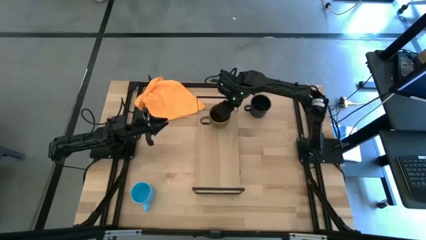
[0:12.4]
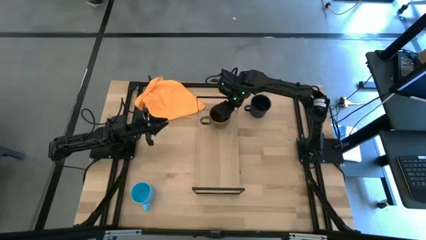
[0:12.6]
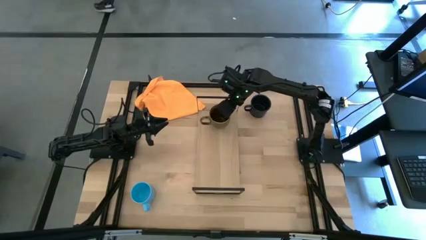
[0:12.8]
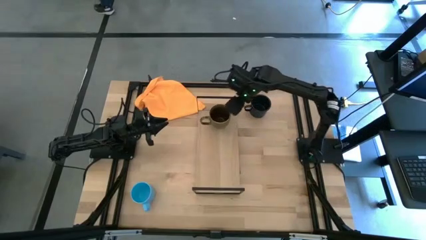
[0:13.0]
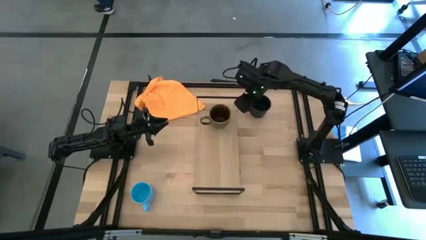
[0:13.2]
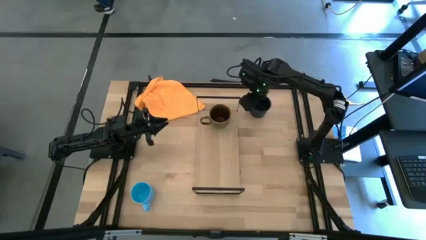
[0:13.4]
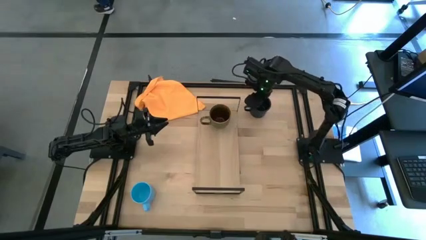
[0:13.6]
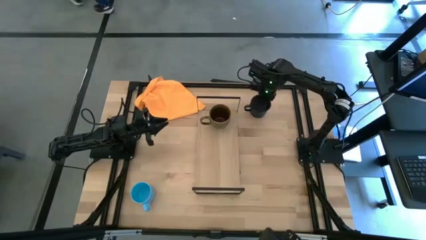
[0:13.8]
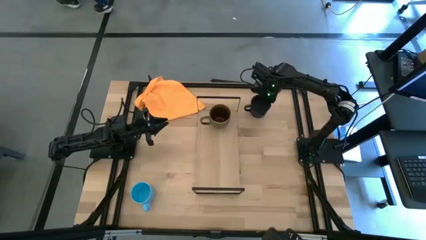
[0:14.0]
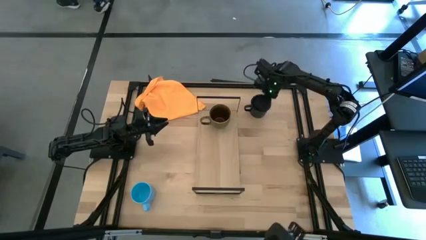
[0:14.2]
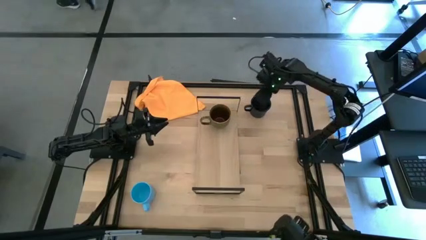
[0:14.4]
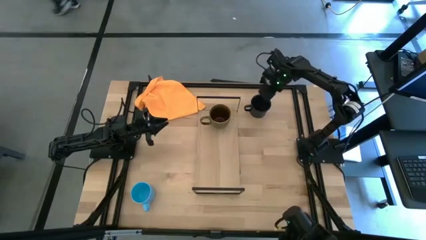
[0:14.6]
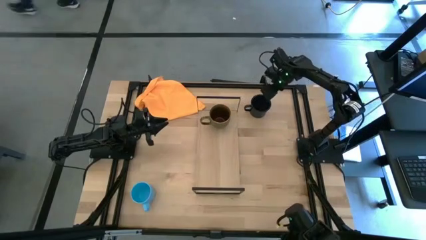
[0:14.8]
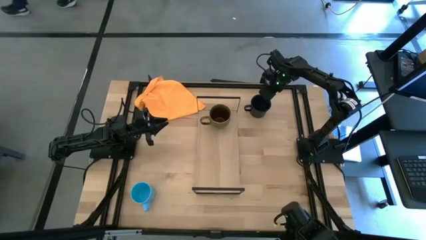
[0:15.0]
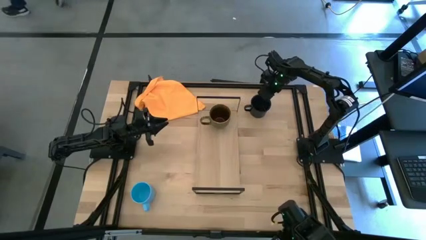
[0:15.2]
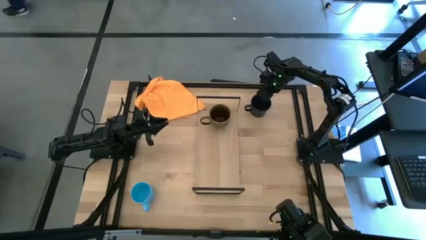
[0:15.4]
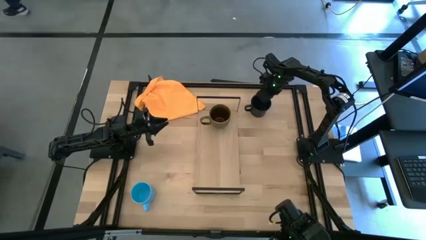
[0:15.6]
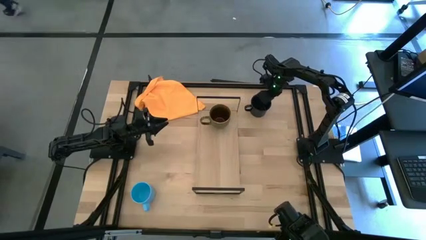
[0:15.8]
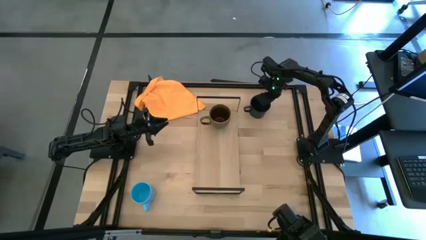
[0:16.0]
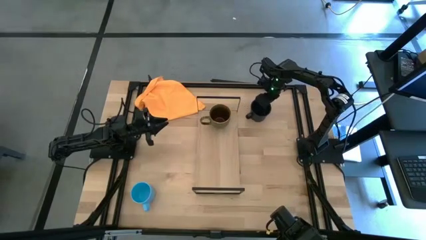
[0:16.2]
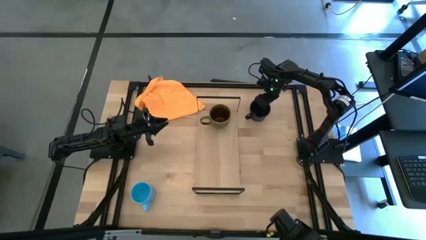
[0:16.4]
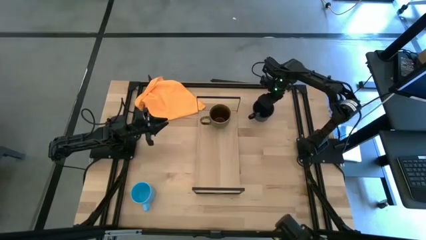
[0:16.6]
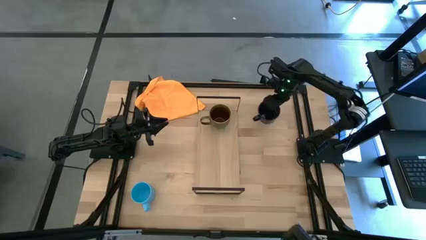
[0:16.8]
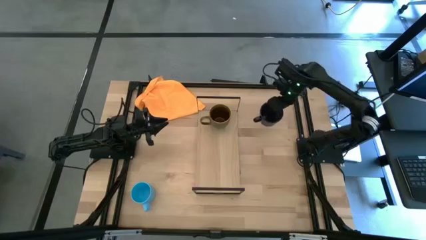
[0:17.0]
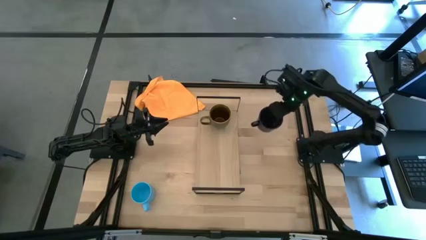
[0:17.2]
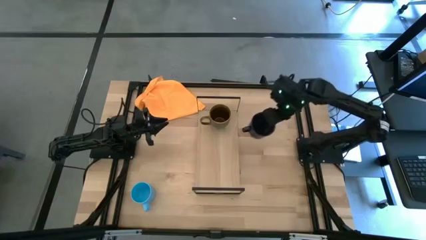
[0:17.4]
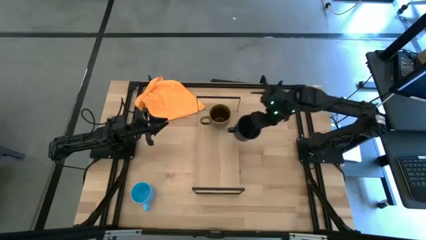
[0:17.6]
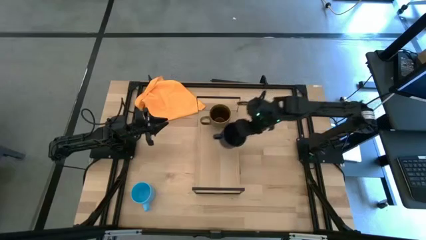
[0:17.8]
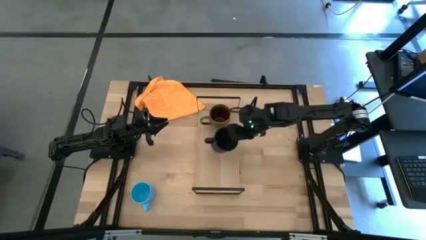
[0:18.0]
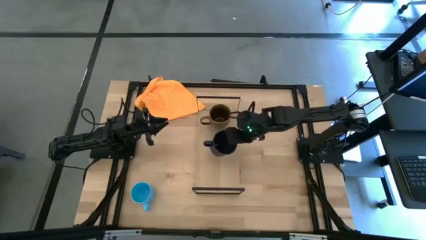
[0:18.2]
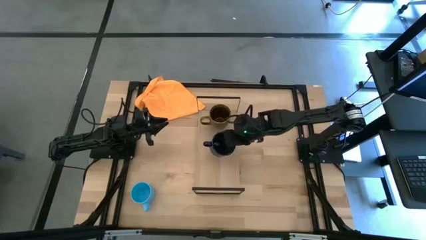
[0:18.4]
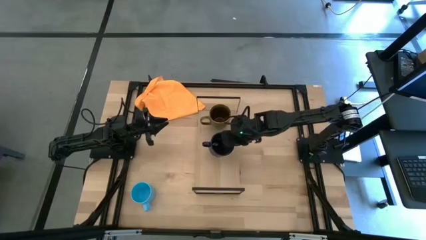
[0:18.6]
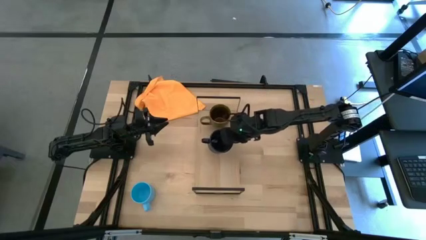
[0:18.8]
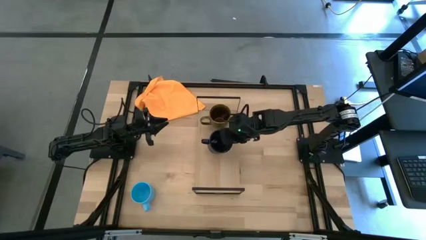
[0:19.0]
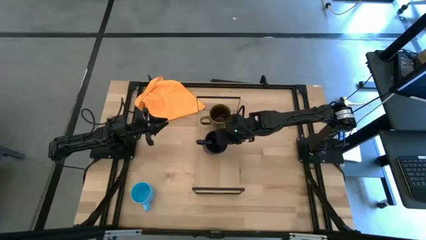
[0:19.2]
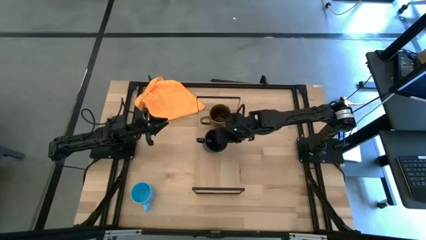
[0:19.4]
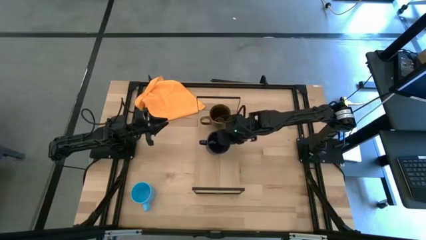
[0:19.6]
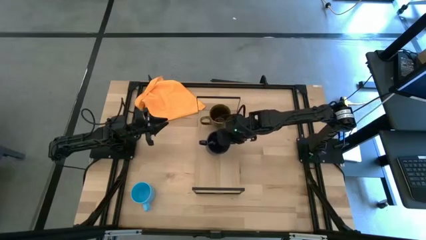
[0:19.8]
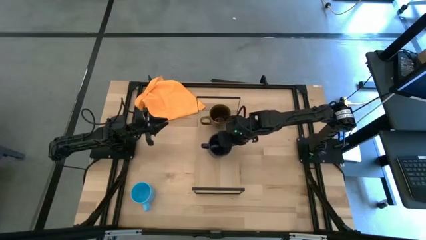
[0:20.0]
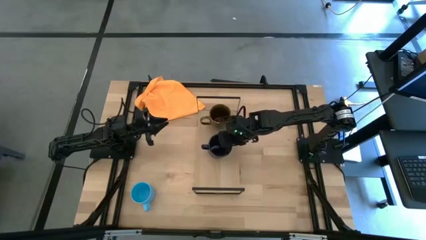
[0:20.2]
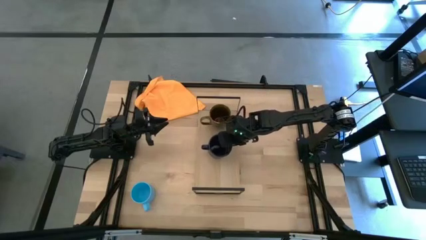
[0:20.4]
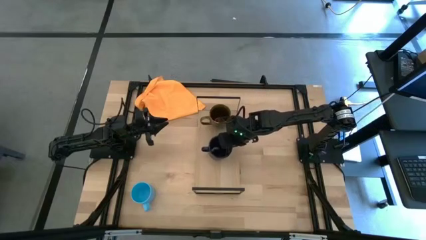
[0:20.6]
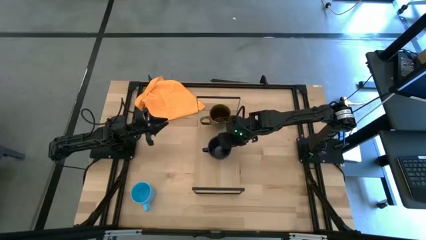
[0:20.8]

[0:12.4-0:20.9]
Task: Stack small to large cups/mugs on shelf
Put the blue mug on the shelf

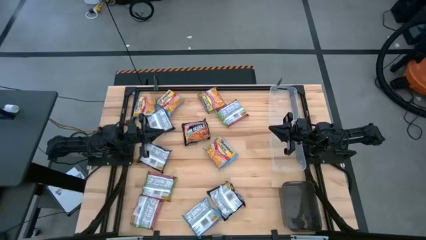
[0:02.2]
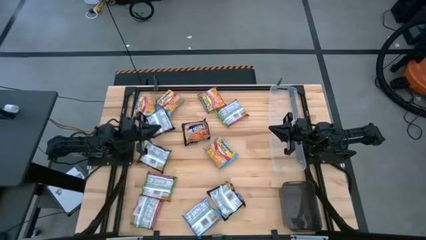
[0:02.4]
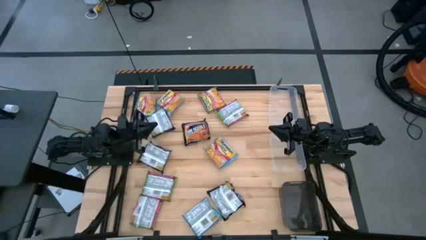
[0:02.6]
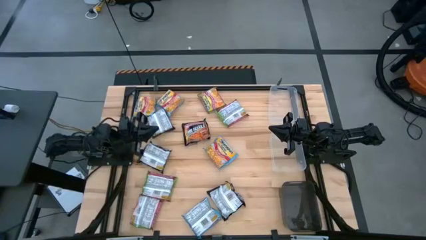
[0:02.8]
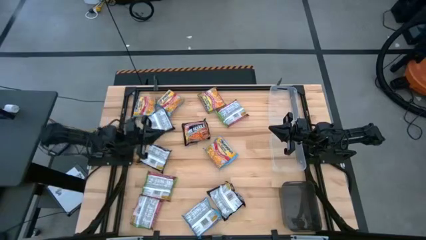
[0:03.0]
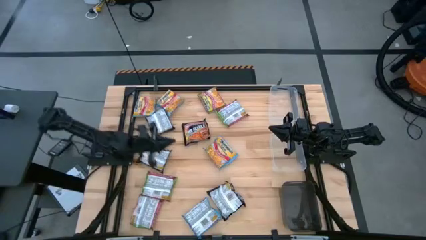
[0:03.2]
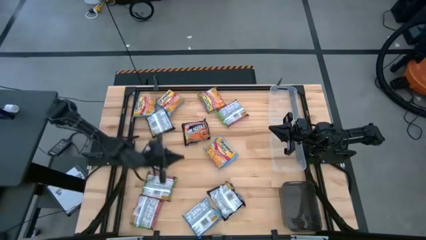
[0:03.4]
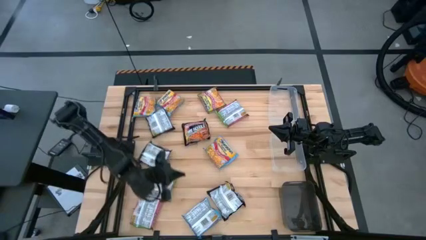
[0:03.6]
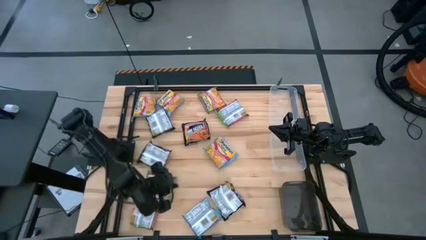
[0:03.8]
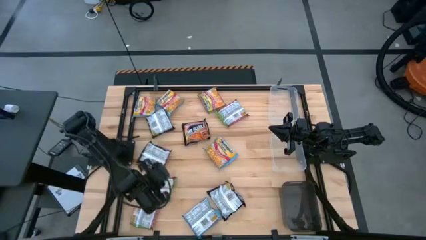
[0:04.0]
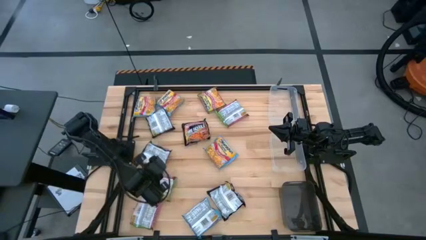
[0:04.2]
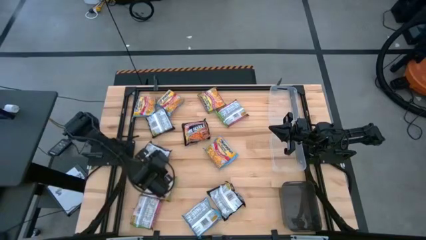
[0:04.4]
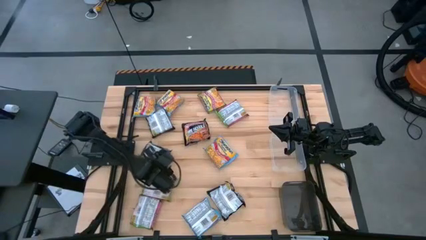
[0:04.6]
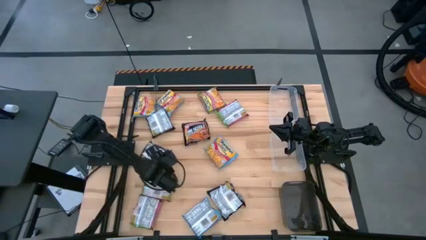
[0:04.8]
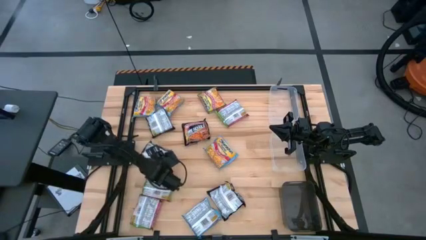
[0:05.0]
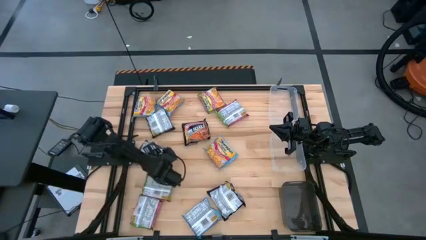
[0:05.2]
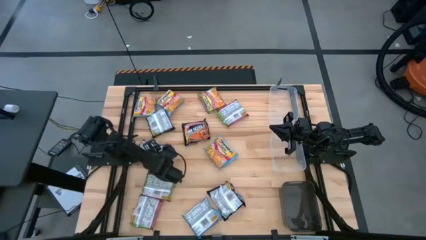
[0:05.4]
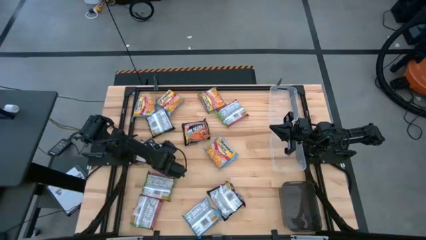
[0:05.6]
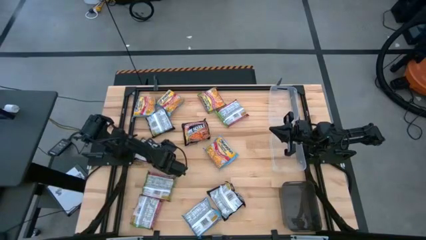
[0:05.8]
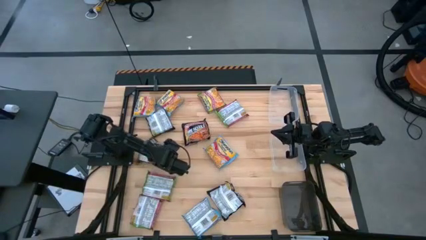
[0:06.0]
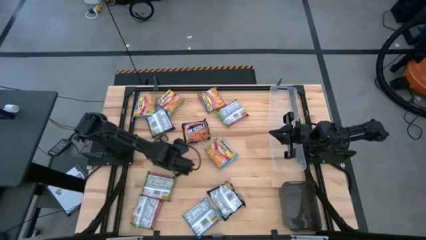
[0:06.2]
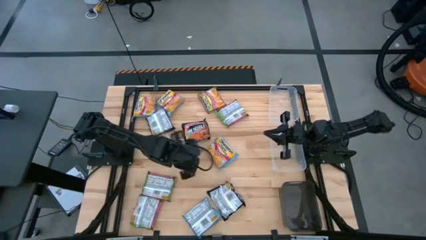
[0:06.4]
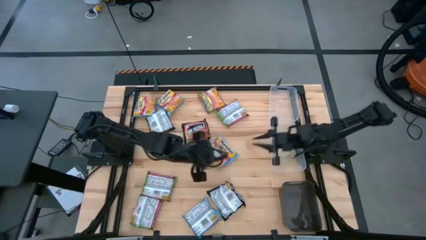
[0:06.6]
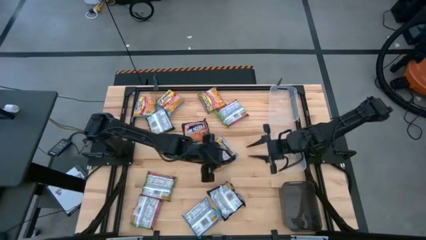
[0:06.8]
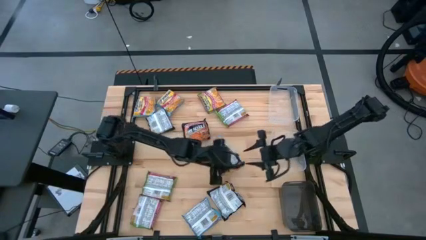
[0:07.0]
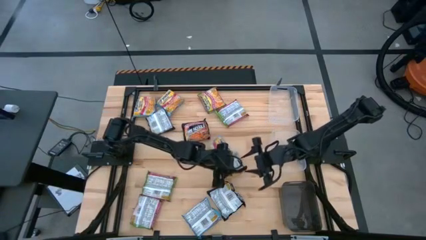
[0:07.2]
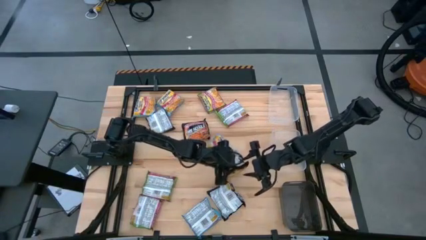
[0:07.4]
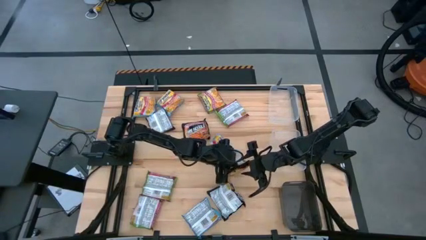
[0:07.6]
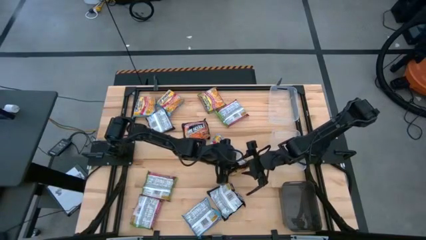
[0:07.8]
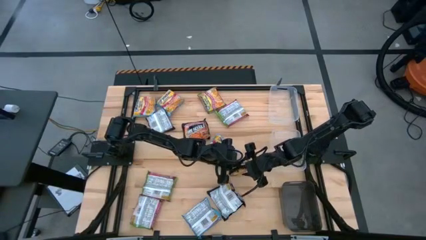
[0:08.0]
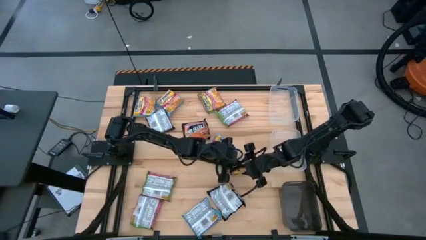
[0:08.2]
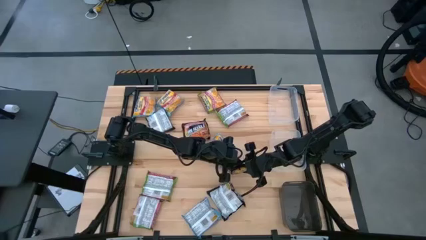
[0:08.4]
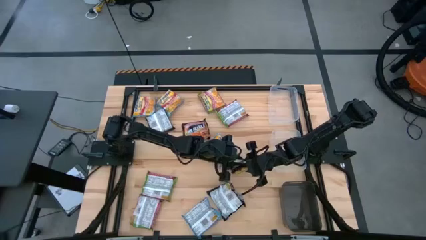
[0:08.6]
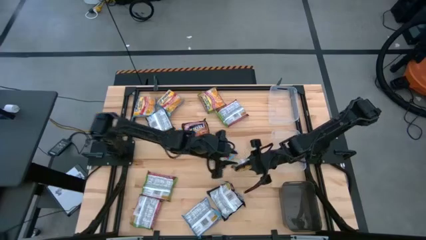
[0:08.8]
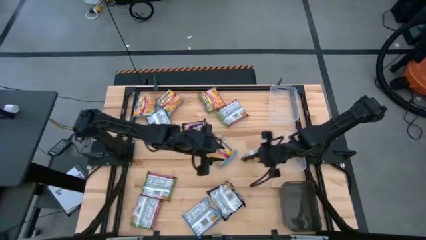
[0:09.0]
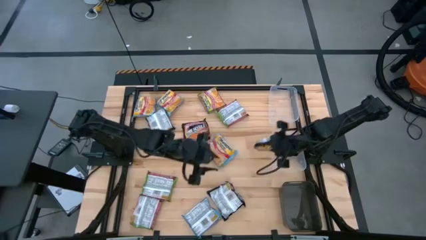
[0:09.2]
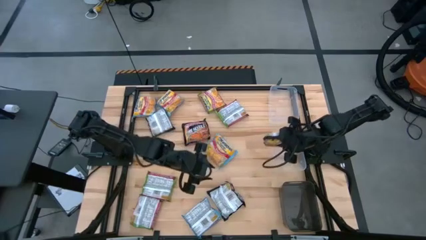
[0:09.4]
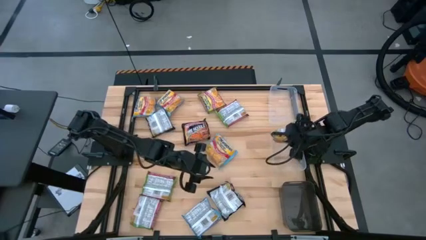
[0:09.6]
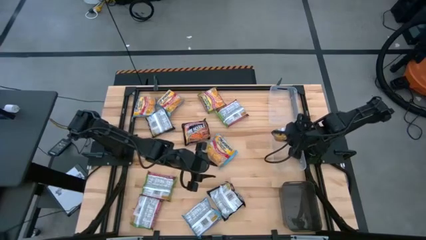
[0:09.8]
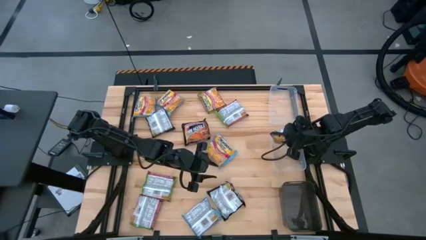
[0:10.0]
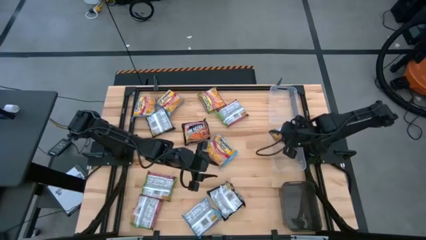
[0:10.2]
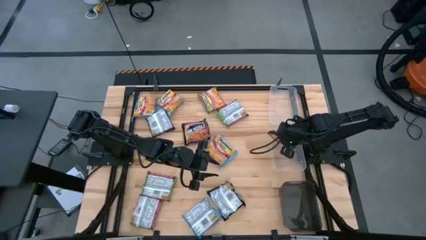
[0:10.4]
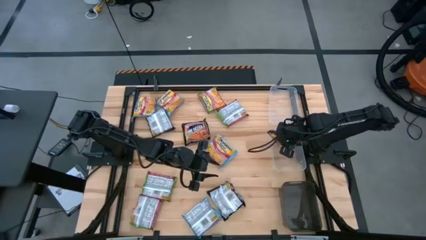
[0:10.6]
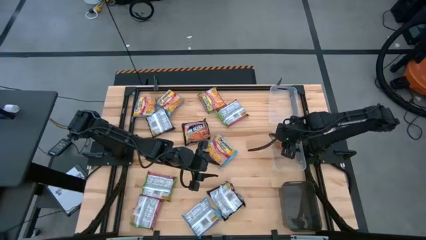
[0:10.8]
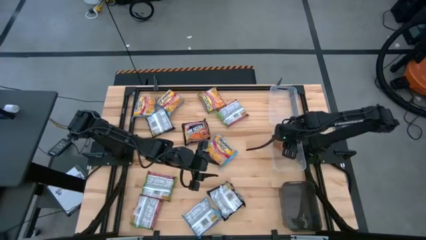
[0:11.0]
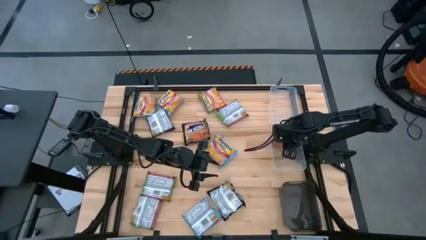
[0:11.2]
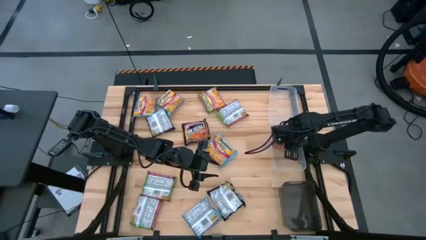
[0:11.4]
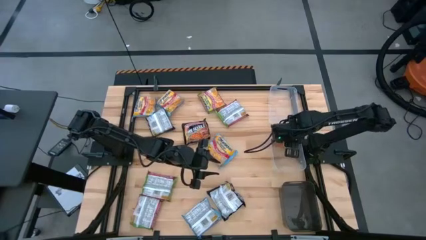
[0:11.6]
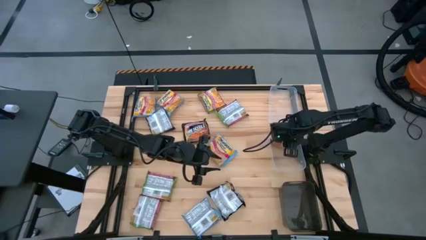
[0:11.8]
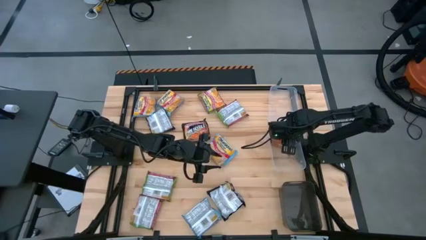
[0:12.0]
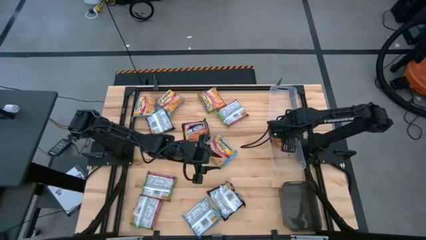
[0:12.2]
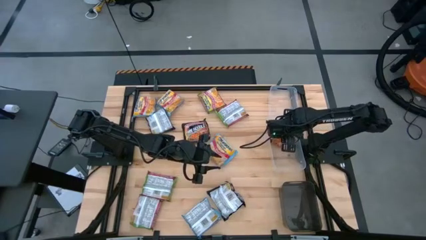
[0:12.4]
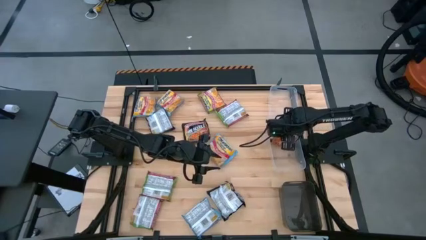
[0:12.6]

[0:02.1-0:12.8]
Task: Sort Maruchan noodles
Put the black noodle pack into the bottom transparent bin
